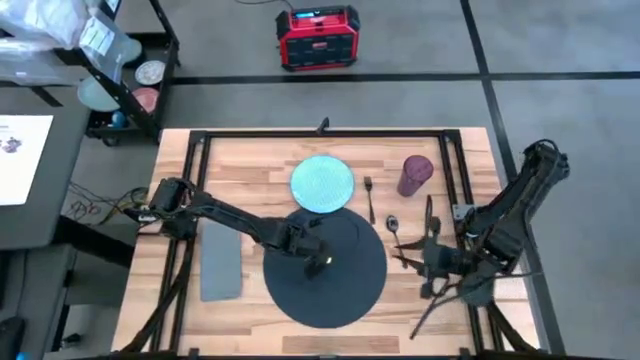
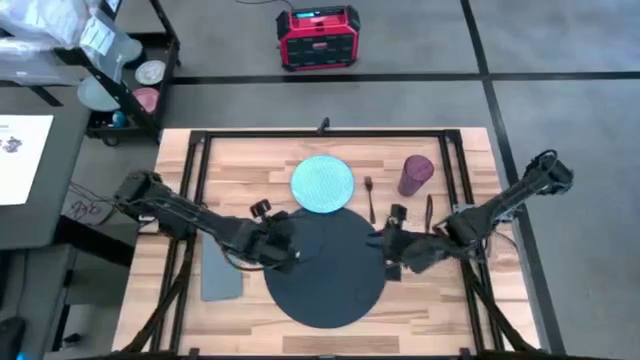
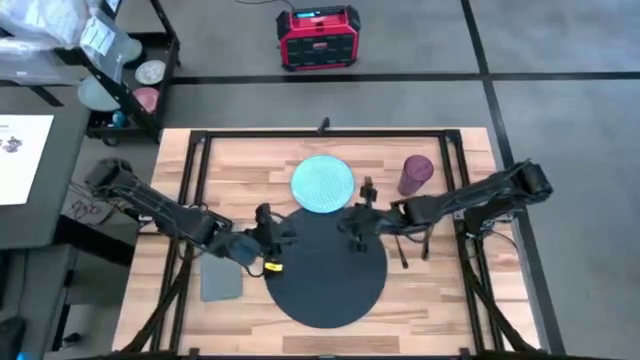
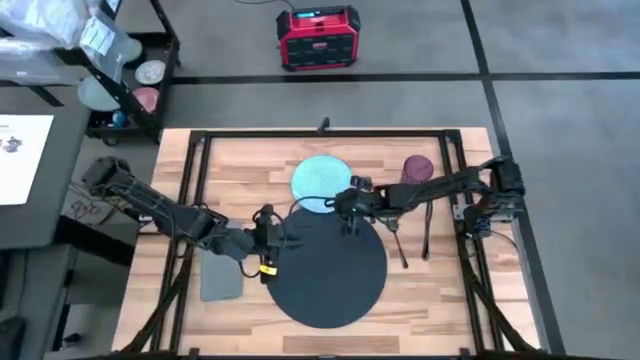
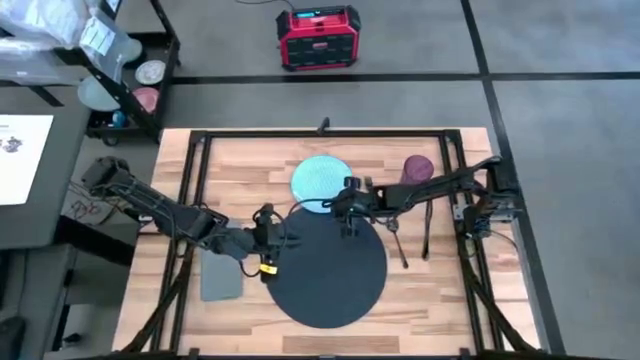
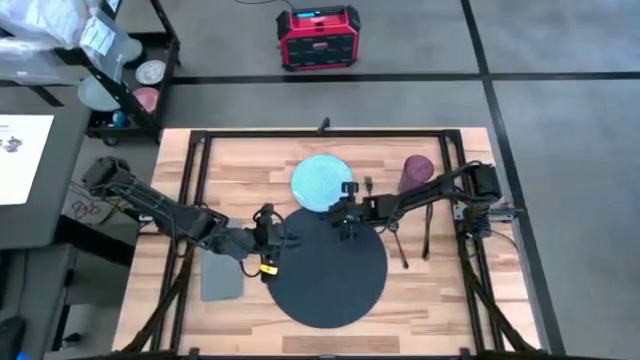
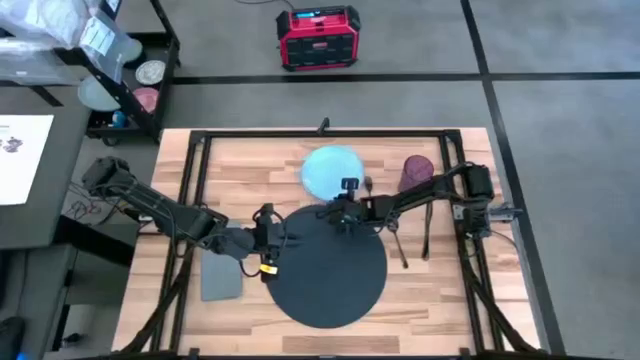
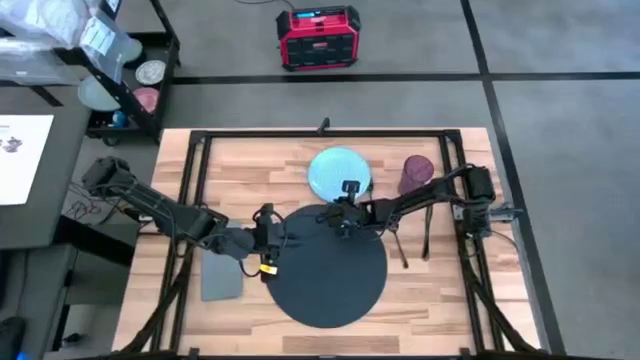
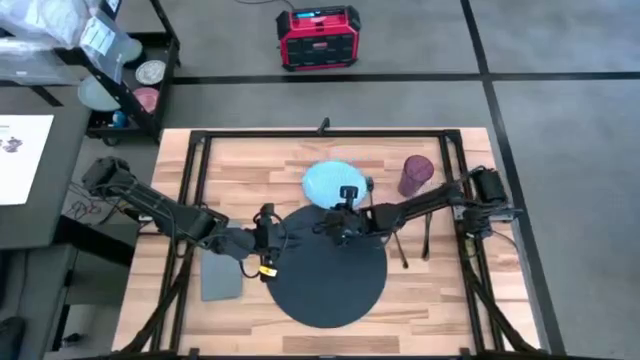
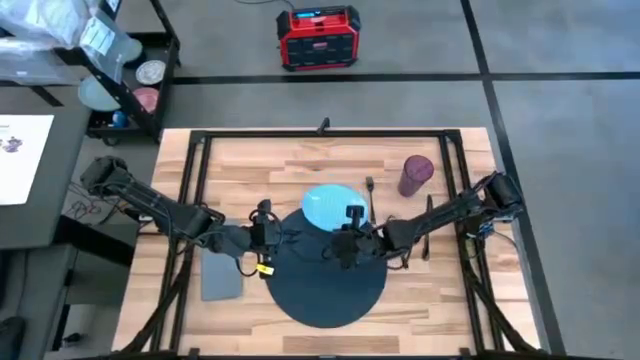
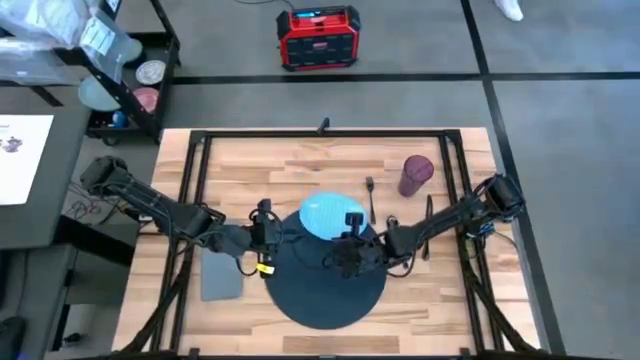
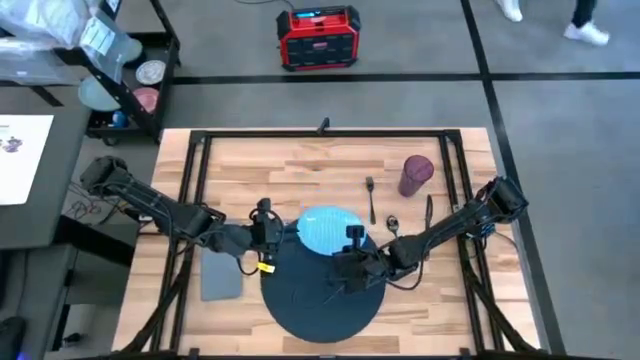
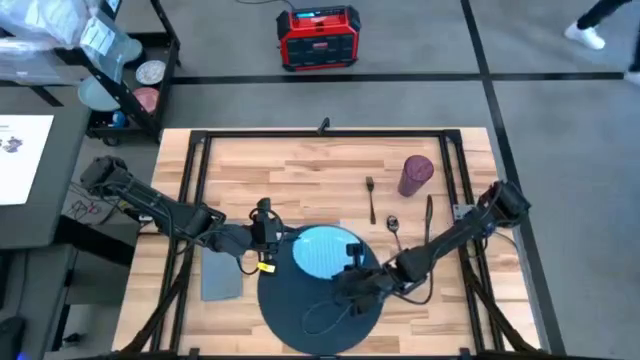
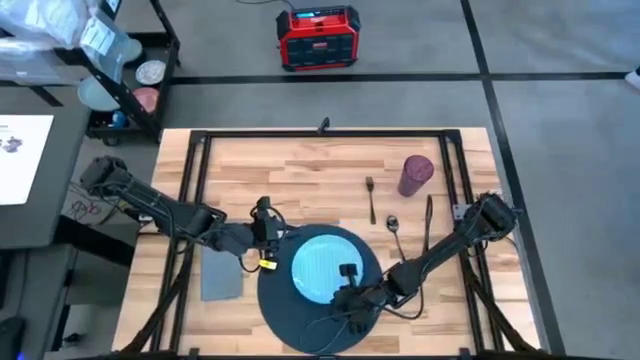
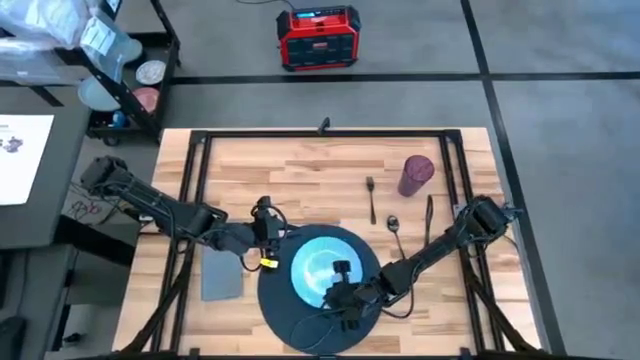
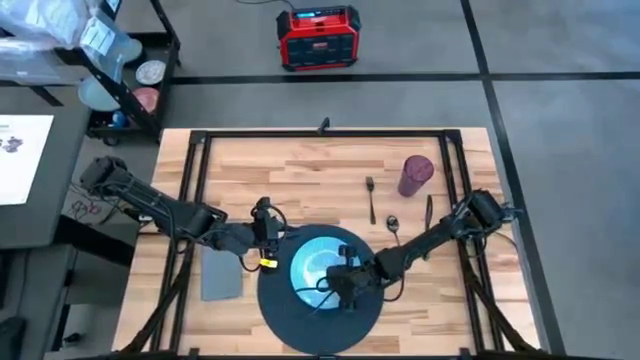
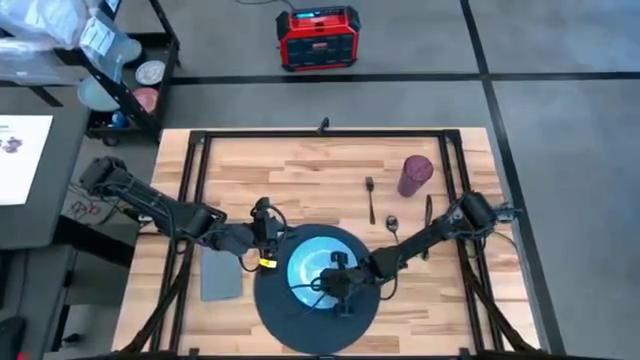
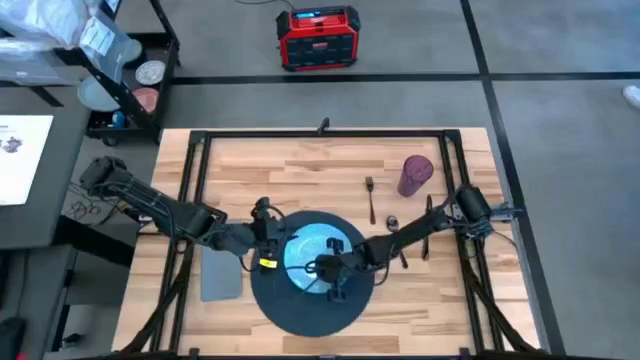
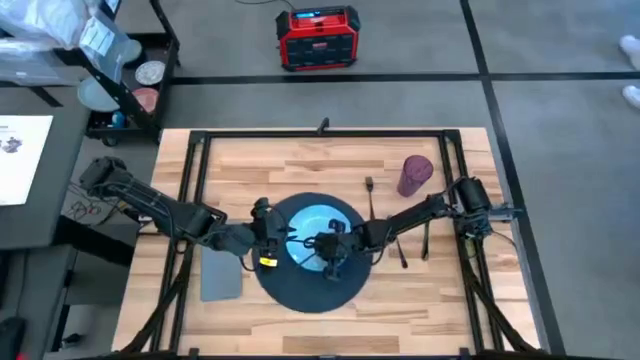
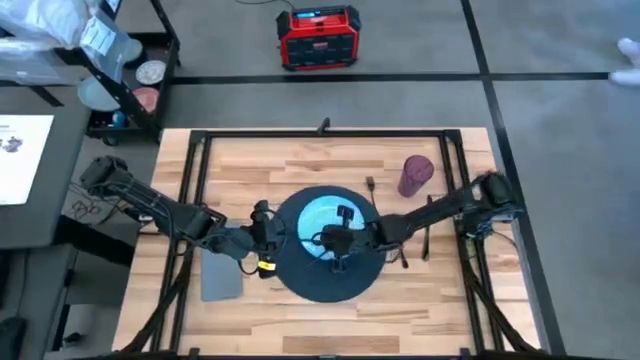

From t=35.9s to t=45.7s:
Task: Set table place
Put the blue plate on the black tablemat

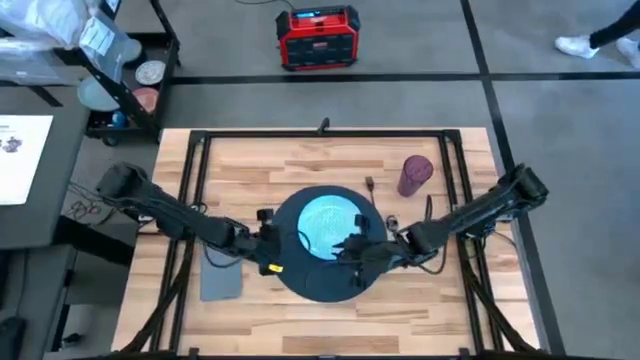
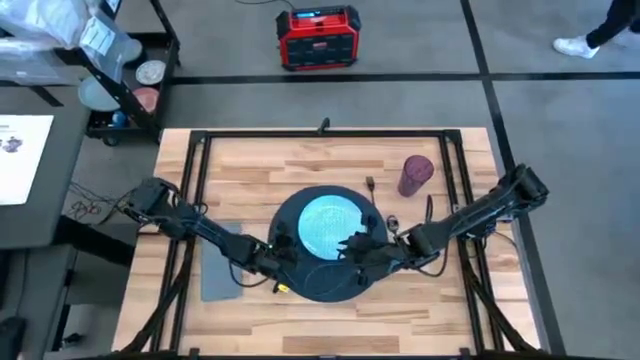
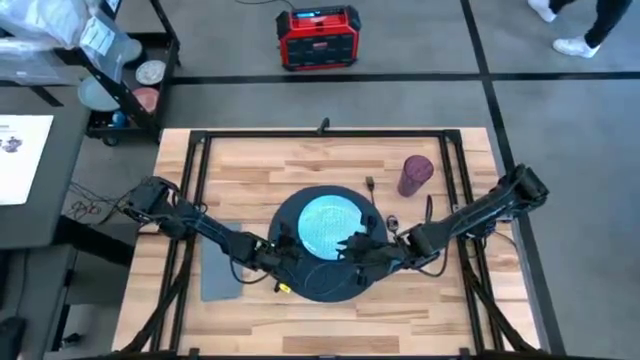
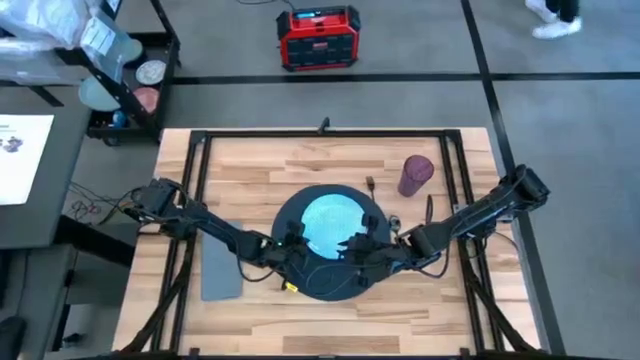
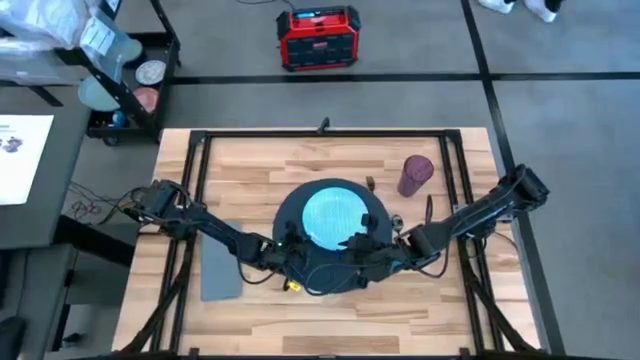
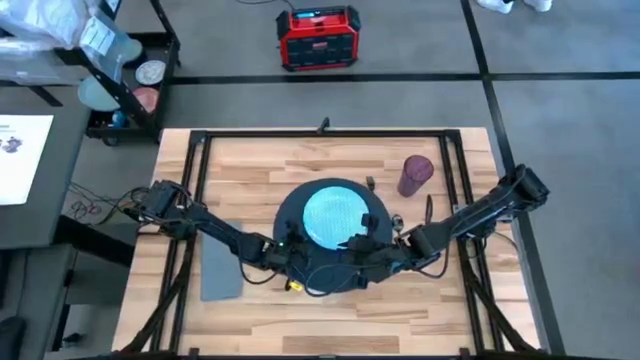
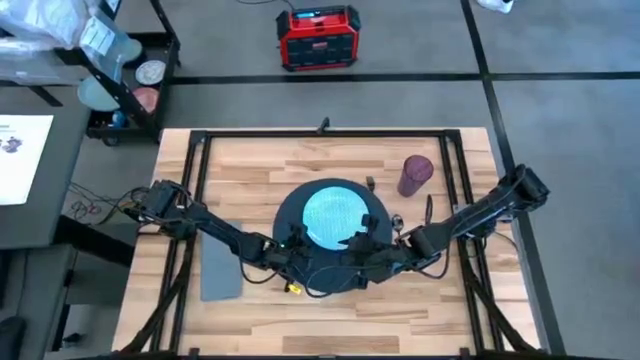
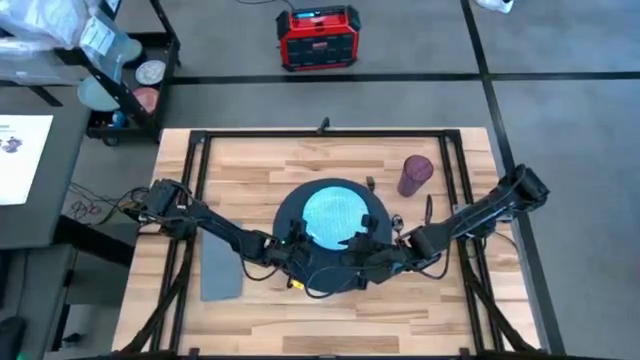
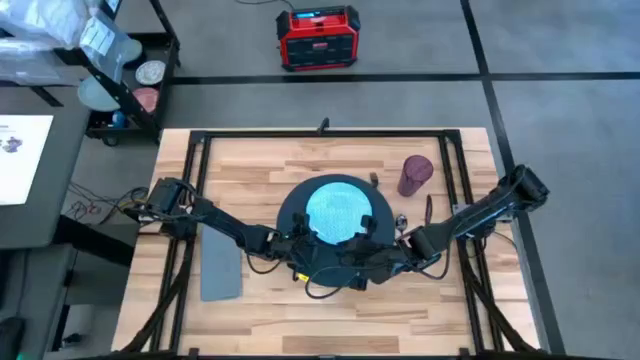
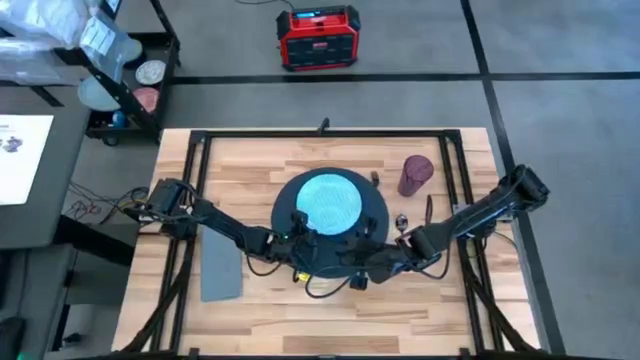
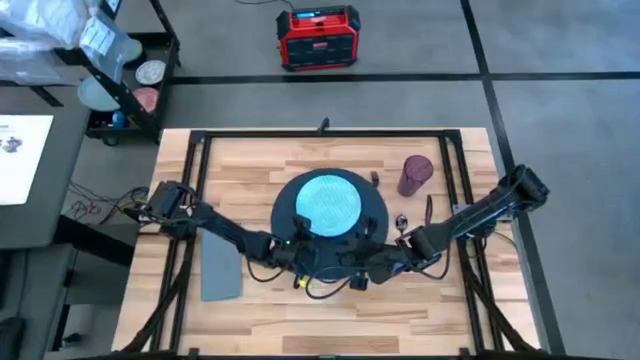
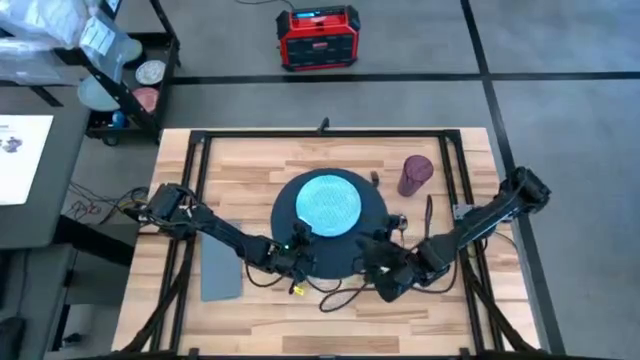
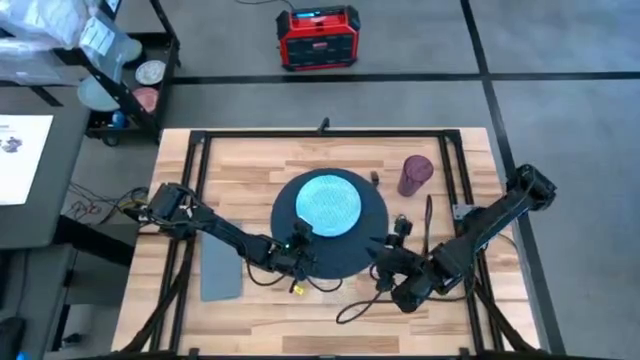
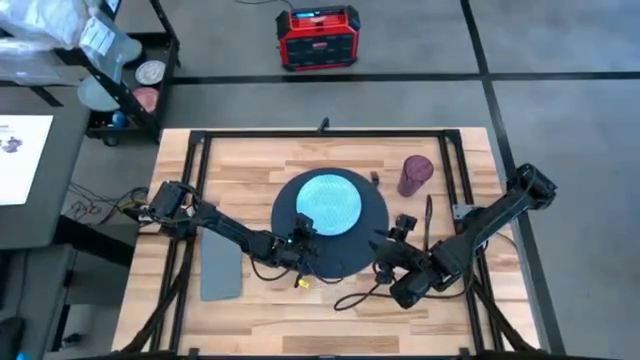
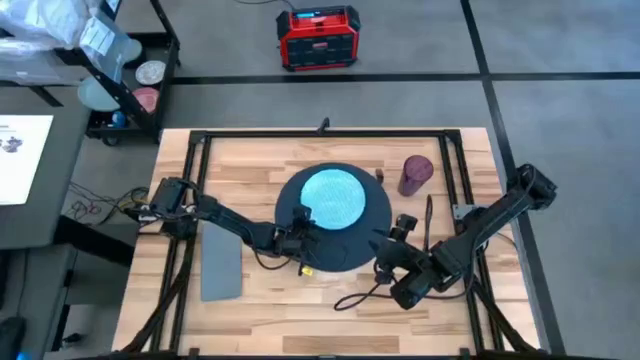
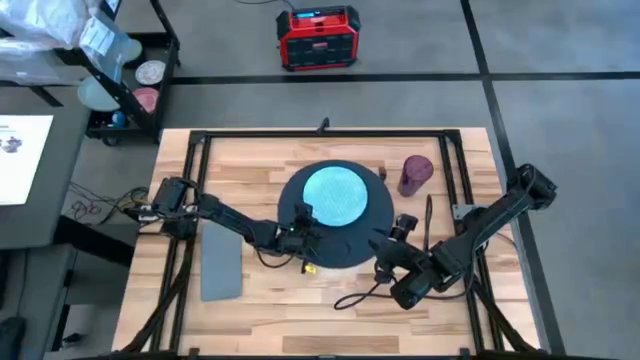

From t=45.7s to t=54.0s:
Adjust the blue plate on the black tablemat

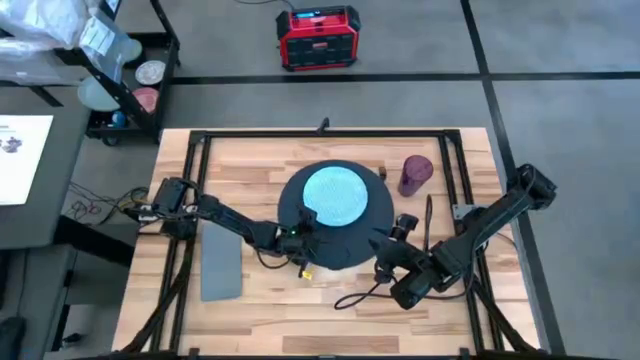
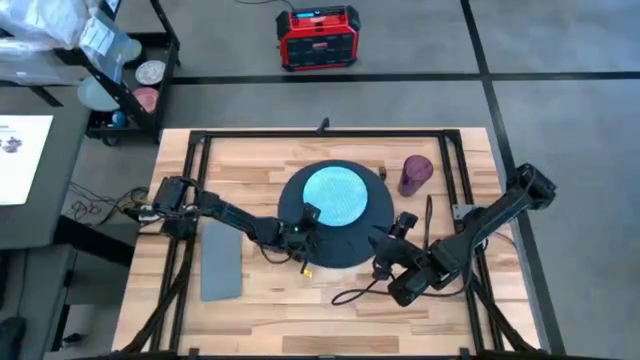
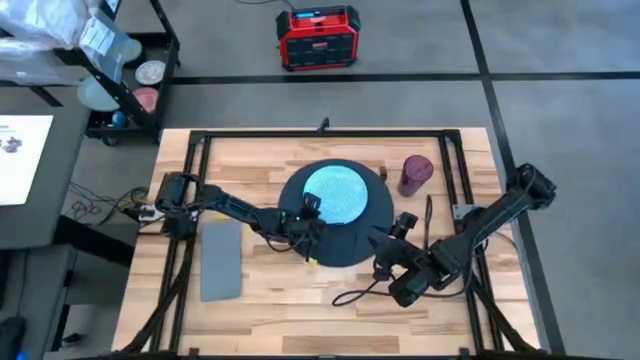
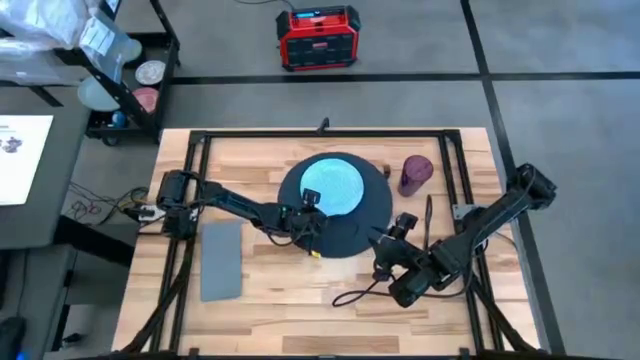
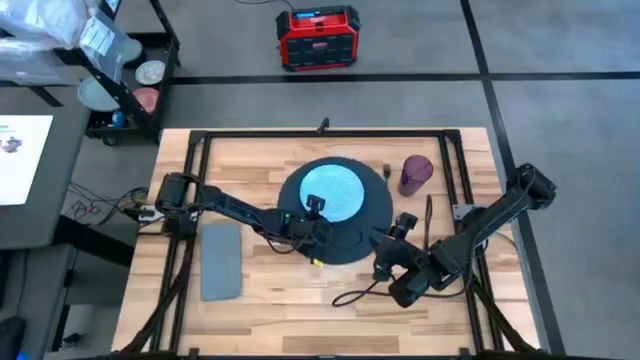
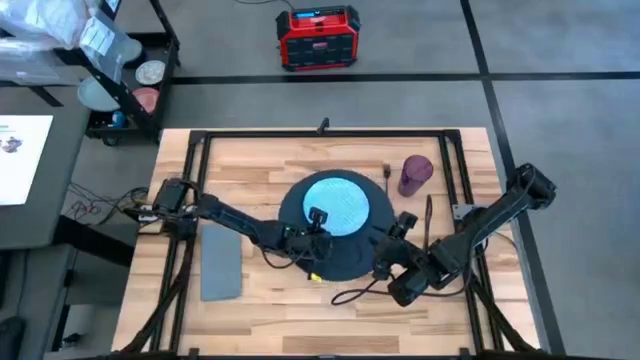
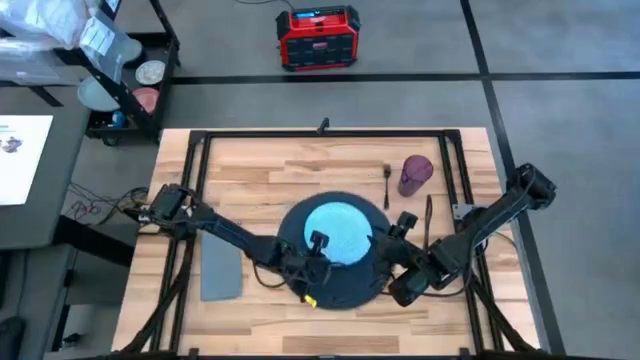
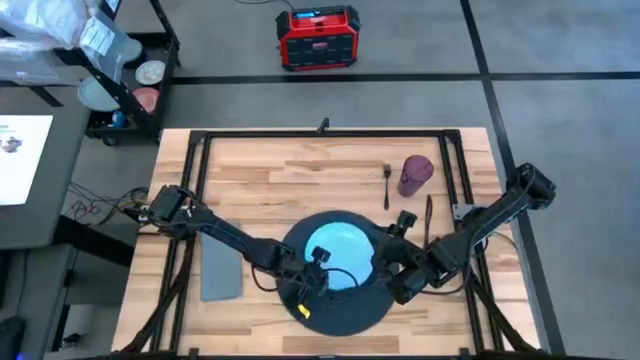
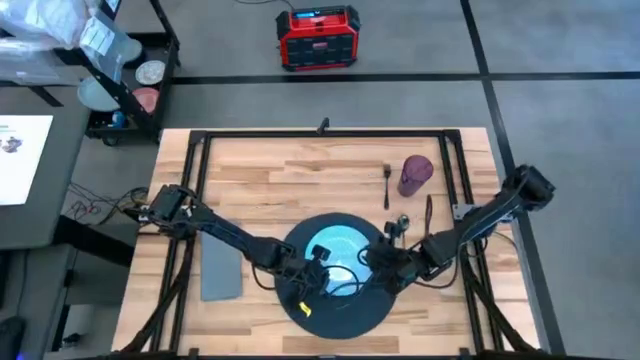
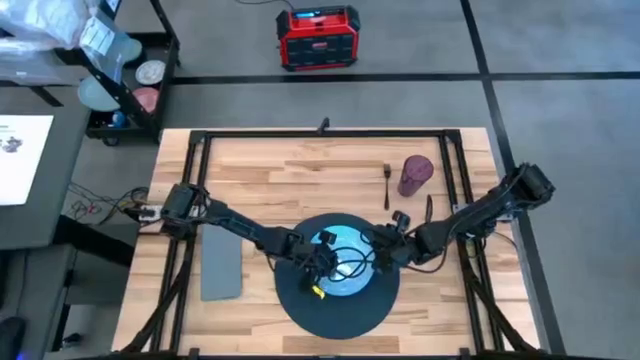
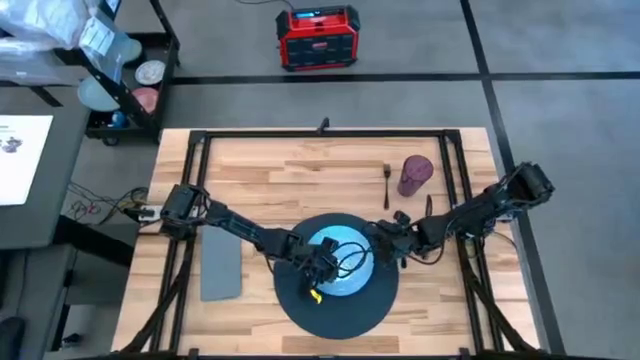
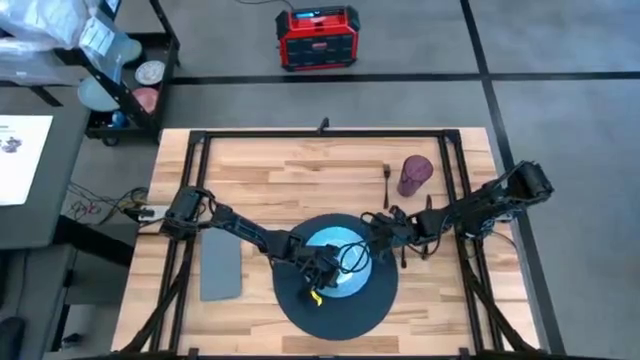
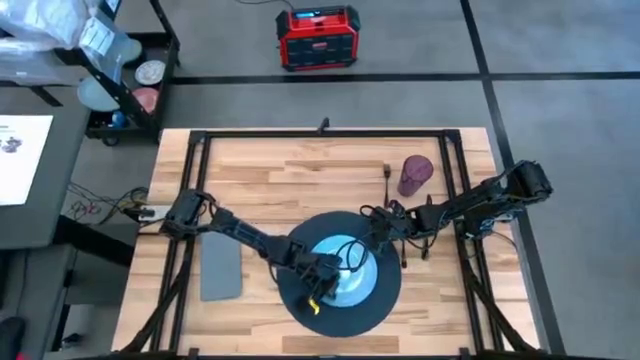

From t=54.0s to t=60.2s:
Adjust the blue plate on the black tablemat
